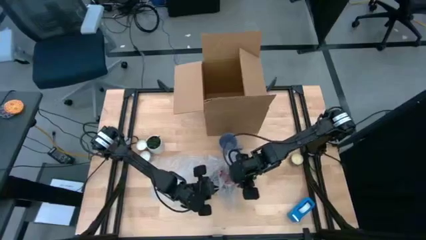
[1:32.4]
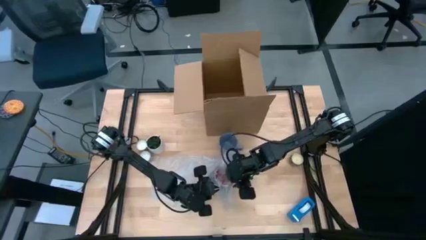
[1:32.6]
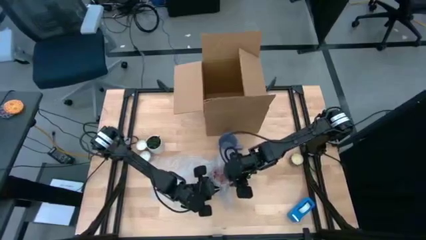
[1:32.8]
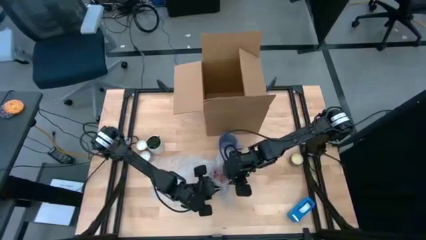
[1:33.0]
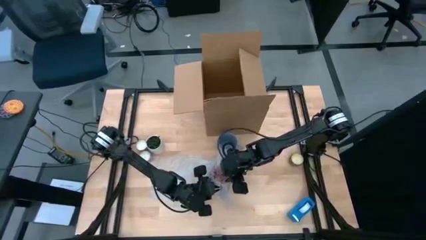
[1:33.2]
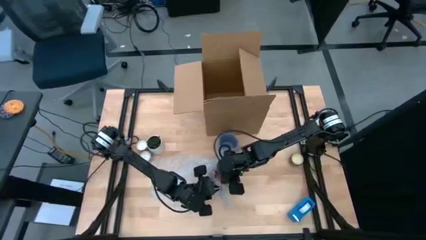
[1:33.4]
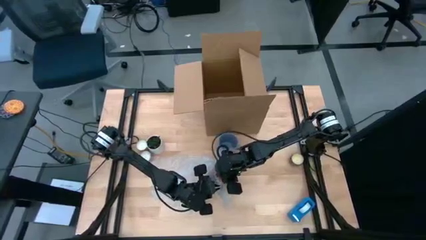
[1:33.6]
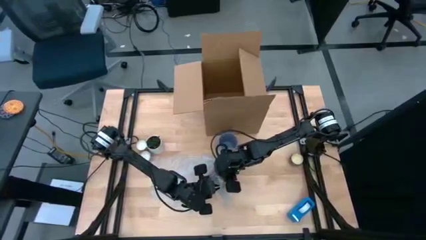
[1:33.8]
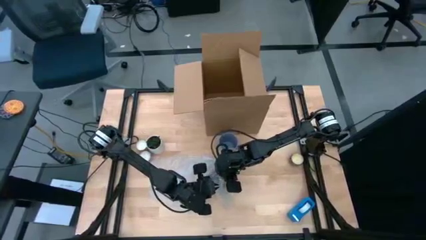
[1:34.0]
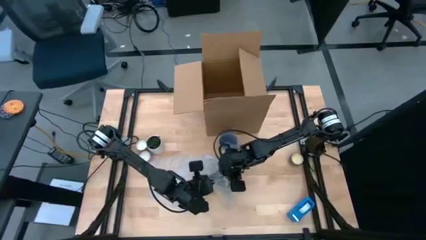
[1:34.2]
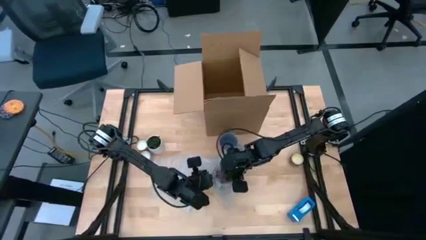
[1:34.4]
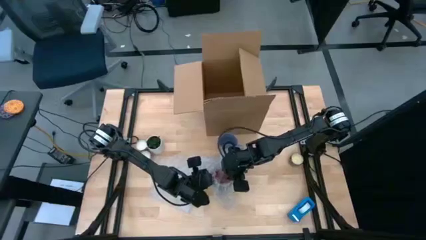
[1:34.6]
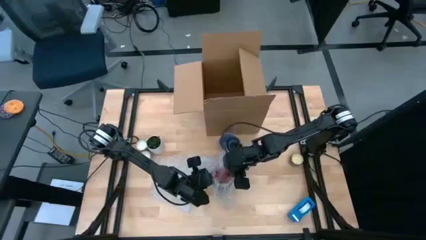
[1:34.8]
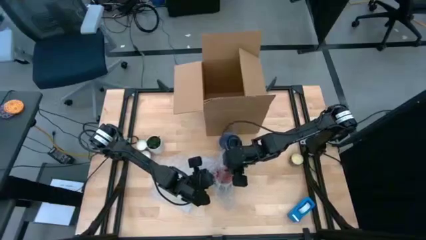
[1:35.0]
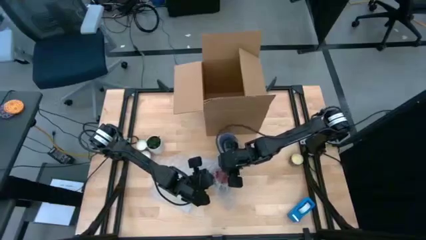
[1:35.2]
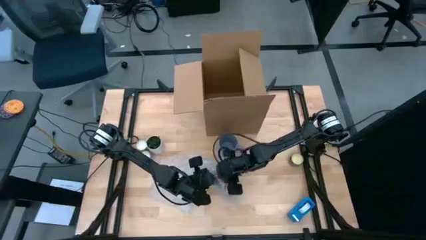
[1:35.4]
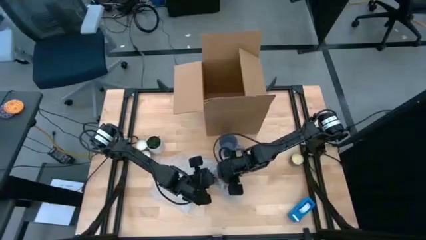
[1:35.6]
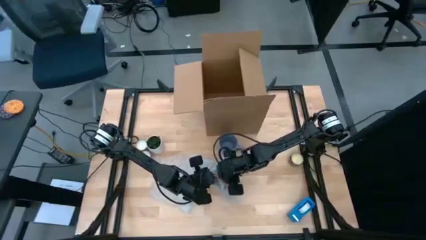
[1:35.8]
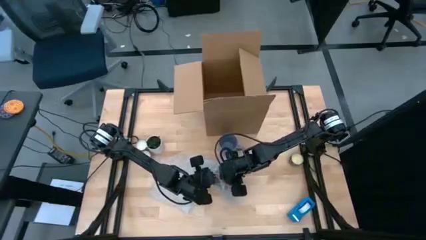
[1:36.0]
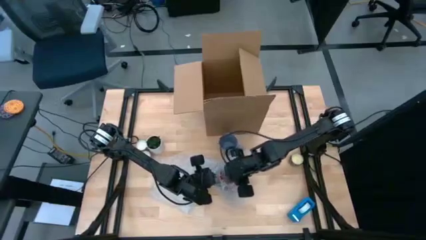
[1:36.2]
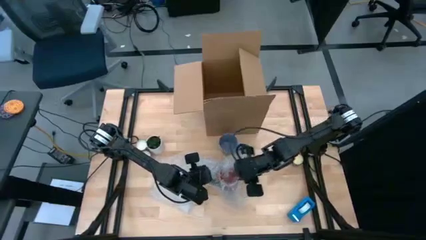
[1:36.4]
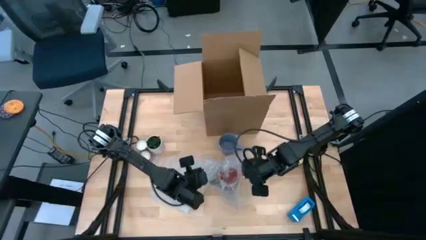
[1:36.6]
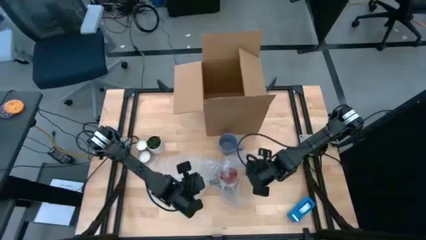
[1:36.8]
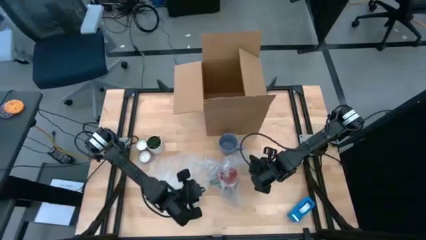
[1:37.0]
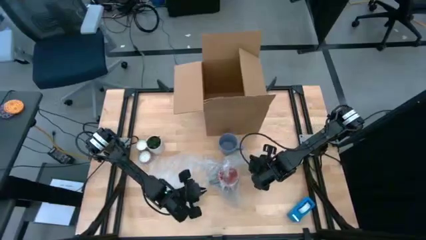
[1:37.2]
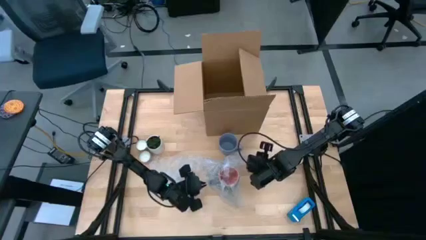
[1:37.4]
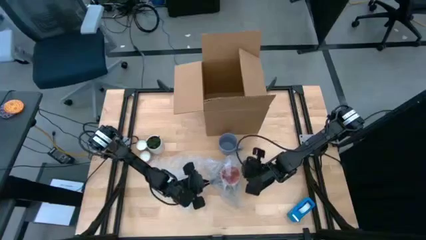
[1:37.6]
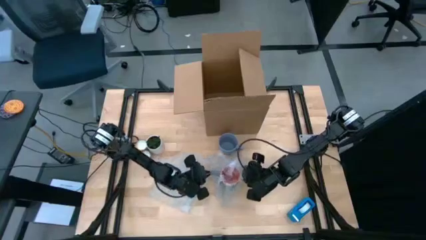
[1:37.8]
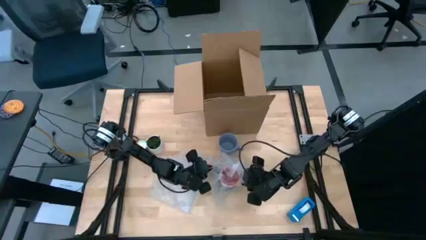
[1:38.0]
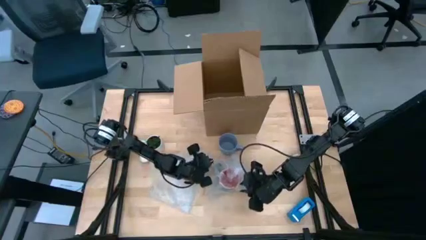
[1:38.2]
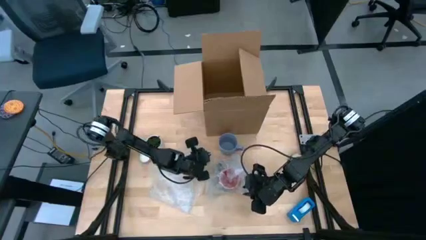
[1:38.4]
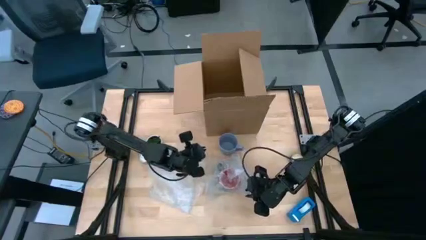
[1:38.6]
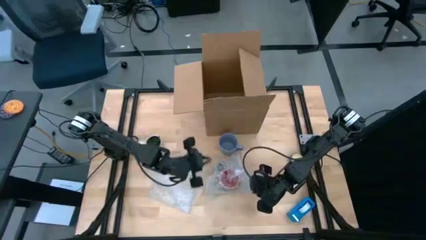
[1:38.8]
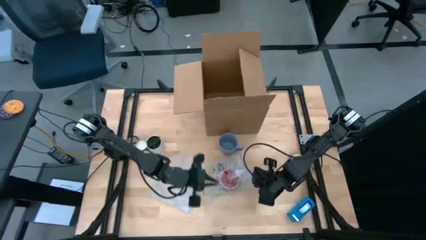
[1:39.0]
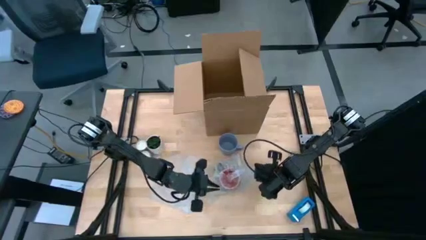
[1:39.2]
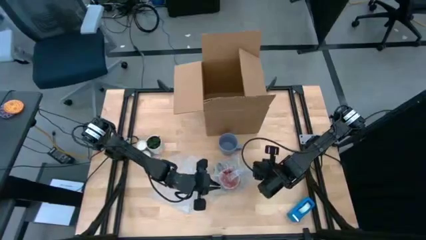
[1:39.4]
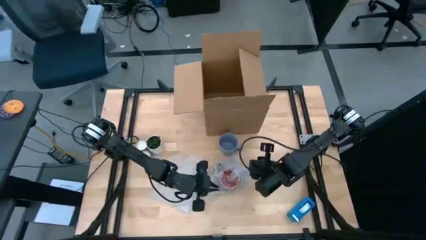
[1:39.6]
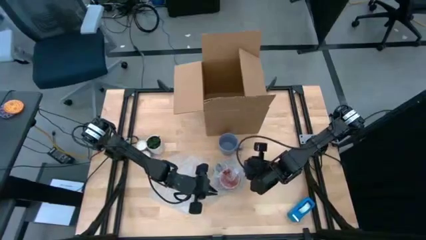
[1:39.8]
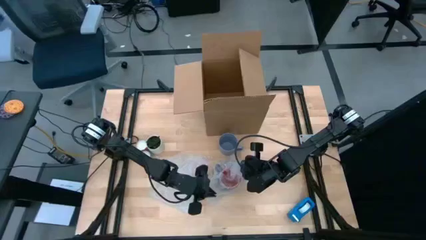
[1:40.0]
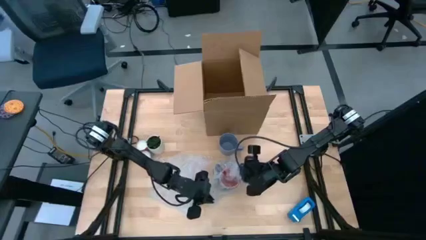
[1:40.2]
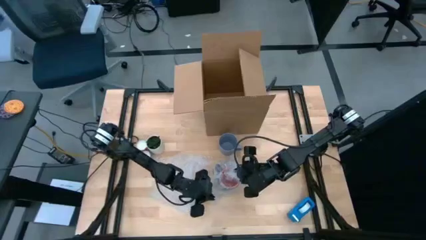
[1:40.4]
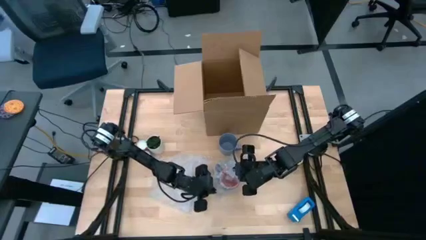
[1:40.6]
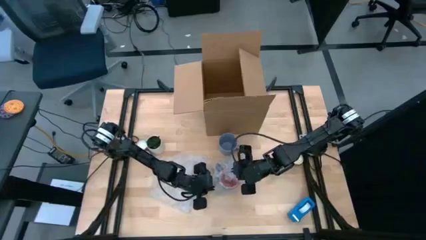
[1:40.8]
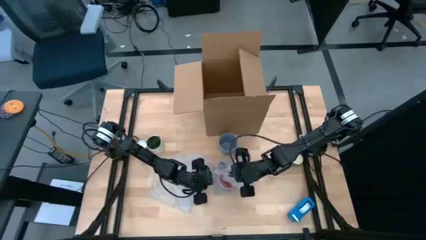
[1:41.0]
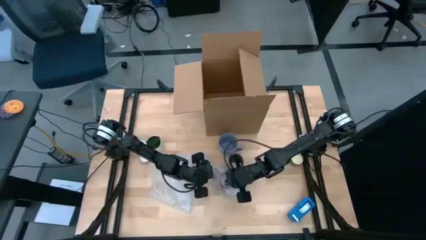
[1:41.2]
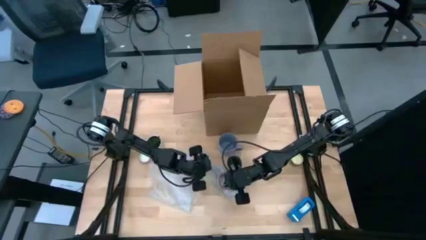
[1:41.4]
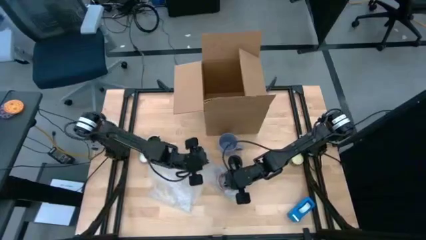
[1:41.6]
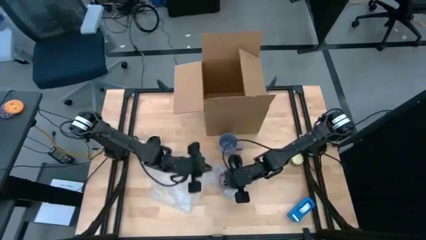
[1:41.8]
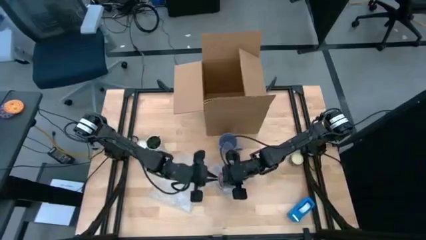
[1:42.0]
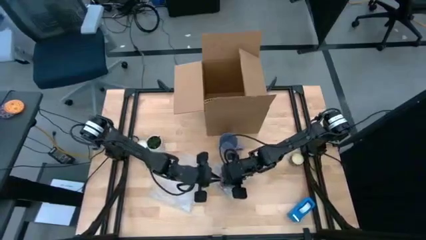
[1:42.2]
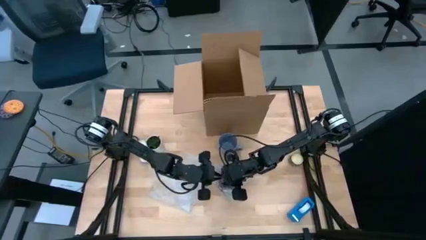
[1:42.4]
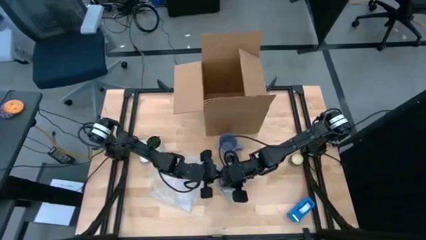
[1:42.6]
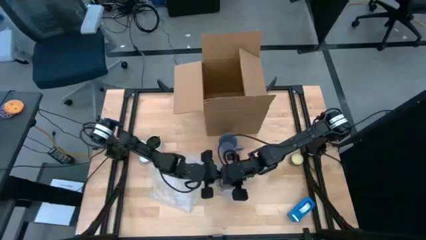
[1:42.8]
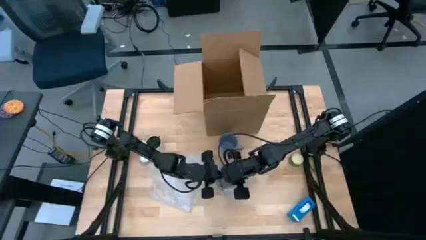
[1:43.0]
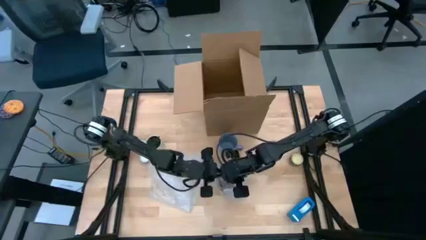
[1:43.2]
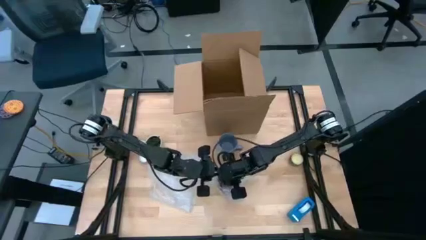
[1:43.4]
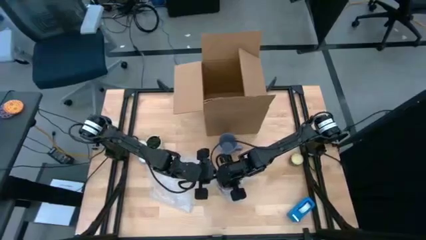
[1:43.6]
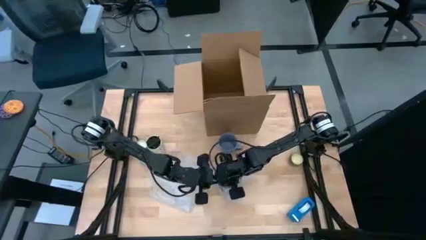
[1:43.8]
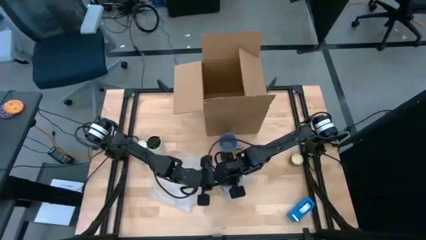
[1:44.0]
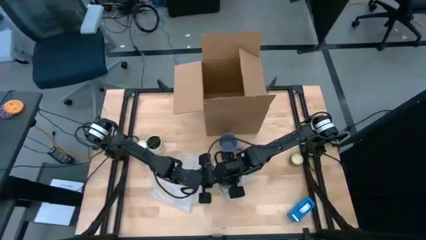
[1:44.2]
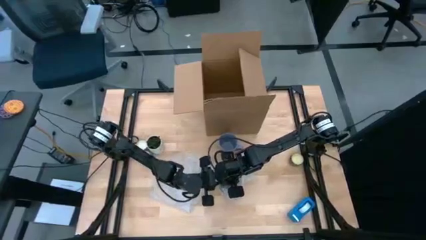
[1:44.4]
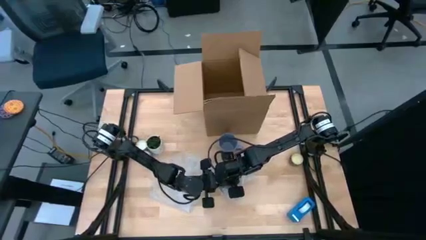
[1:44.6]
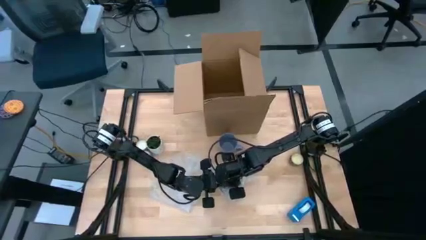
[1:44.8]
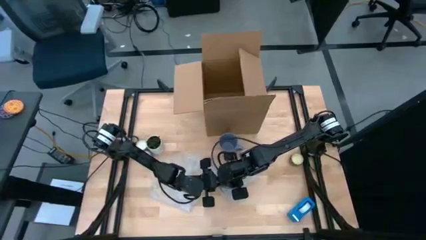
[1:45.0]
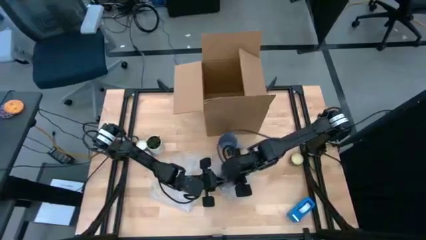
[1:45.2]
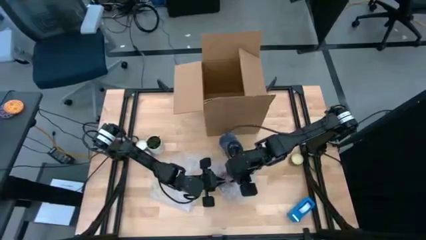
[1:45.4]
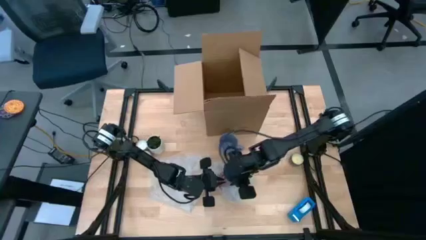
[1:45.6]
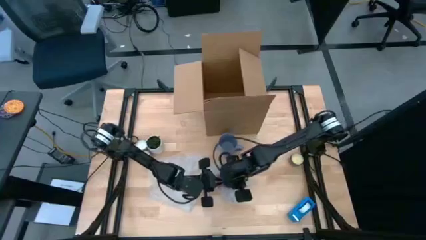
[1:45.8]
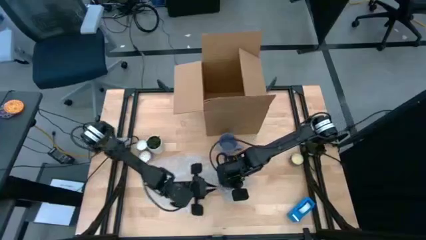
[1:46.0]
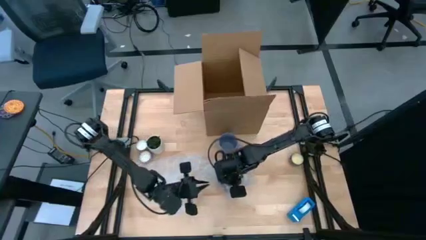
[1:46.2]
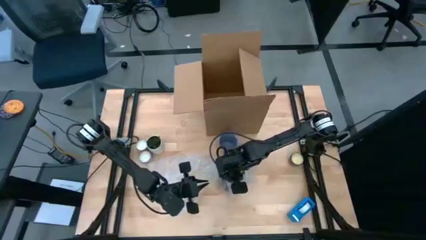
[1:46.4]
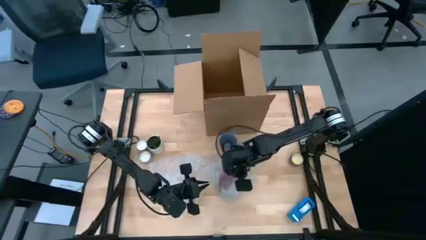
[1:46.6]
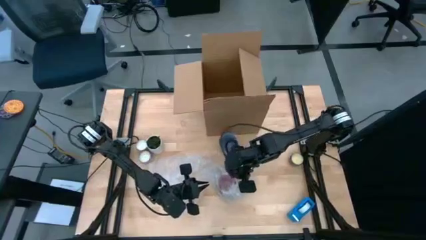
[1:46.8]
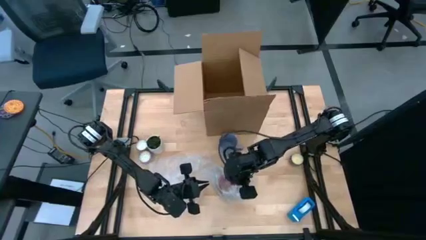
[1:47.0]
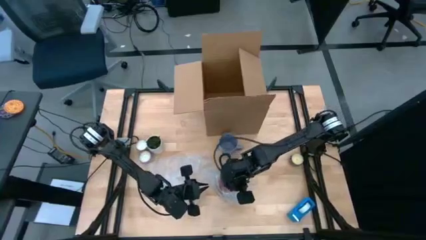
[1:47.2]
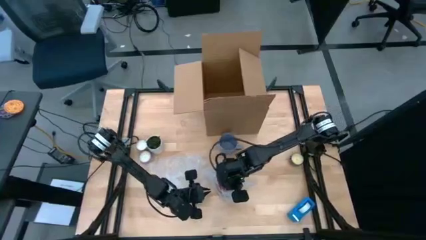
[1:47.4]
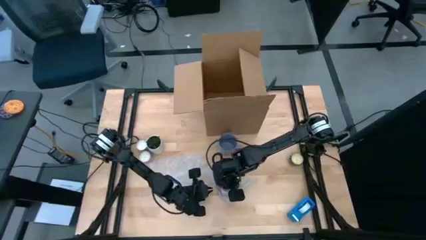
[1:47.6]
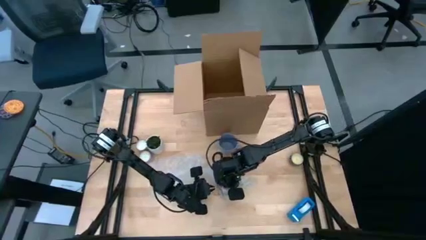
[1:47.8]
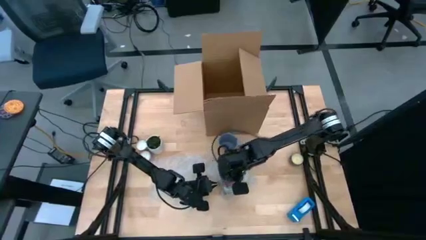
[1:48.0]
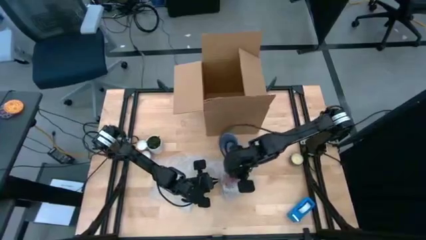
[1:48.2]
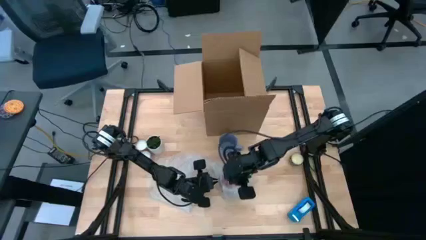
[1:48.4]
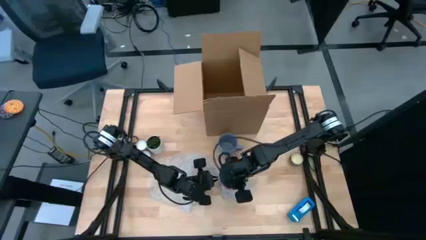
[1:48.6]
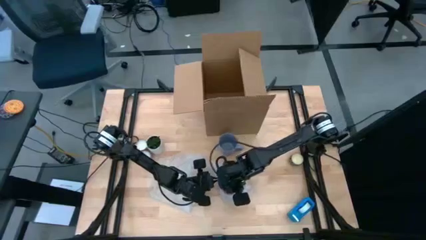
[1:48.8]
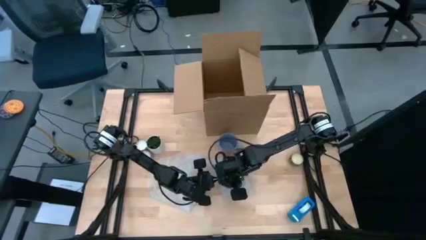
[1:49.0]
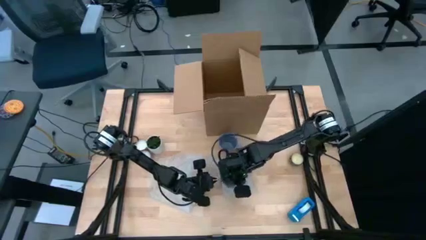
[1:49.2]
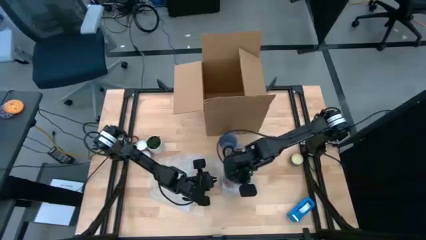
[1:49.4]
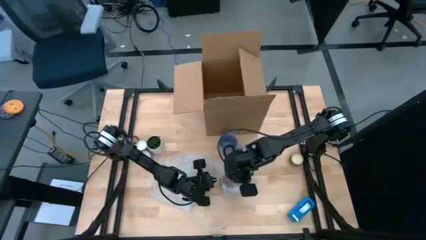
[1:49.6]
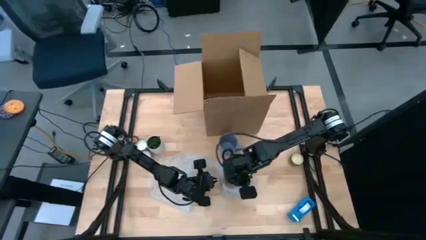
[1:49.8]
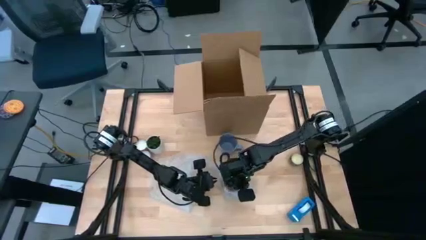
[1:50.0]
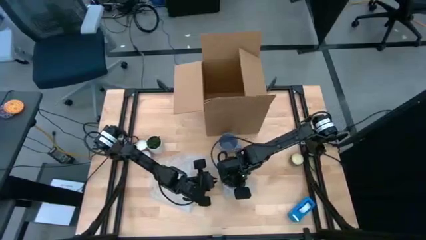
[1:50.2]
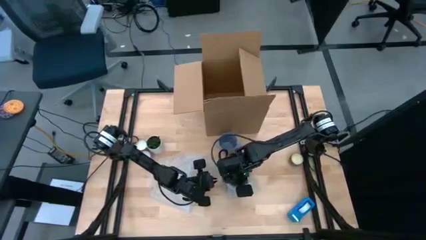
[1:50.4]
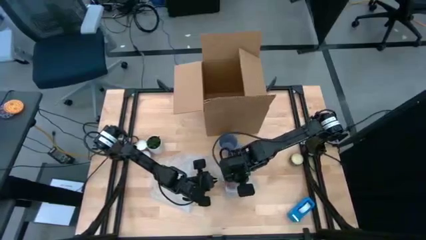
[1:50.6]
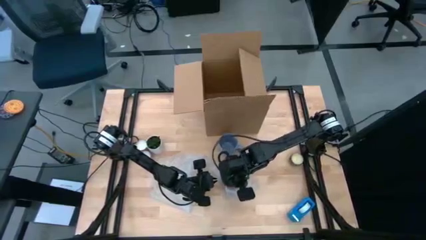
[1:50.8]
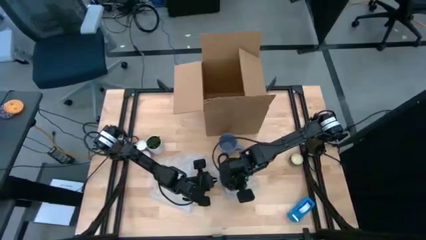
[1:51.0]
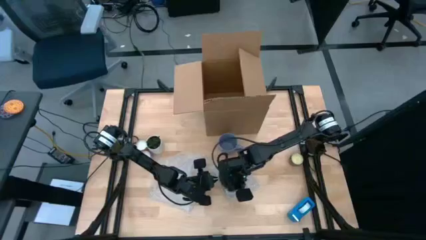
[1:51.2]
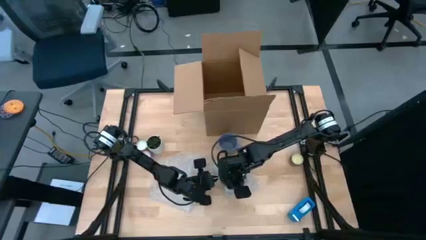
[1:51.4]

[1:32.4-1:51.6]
Task: wrap mug
Wrap the black mug with the top bubble wrap
